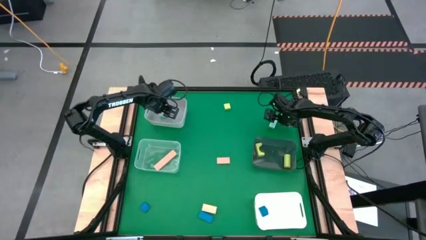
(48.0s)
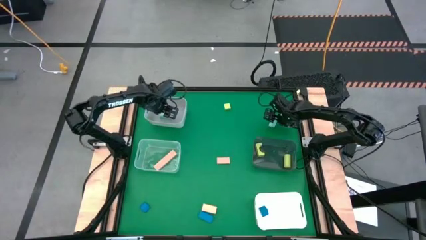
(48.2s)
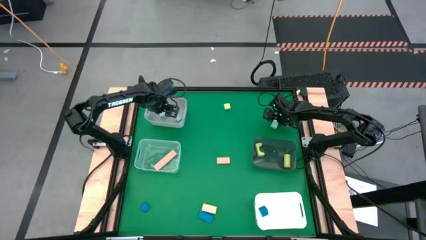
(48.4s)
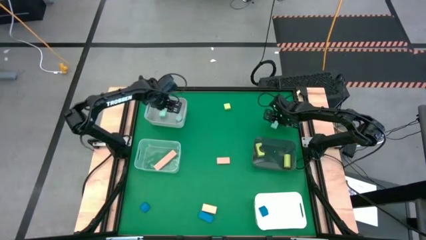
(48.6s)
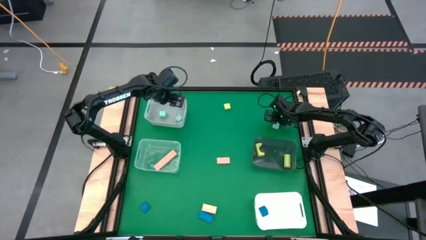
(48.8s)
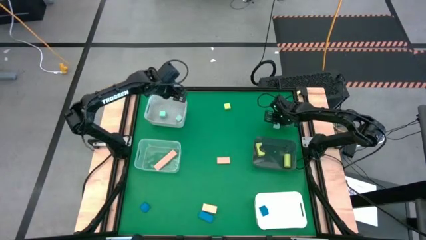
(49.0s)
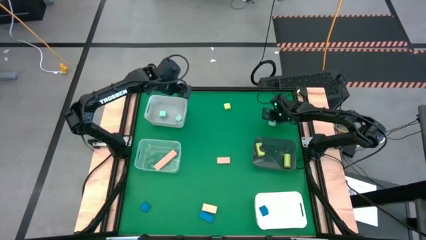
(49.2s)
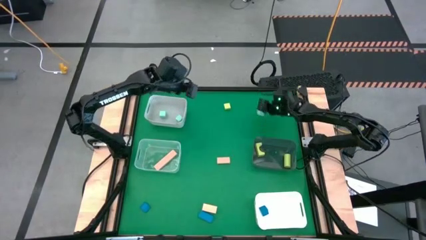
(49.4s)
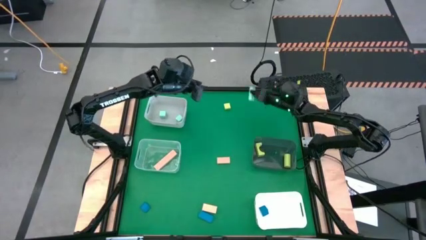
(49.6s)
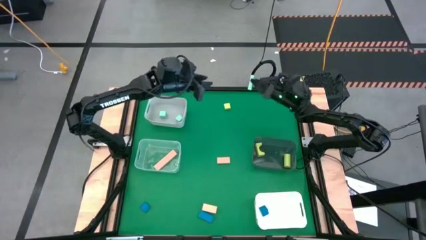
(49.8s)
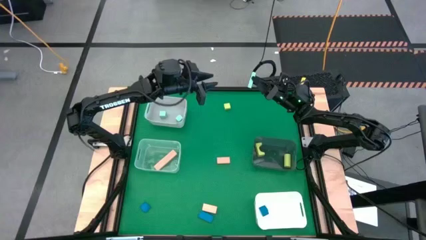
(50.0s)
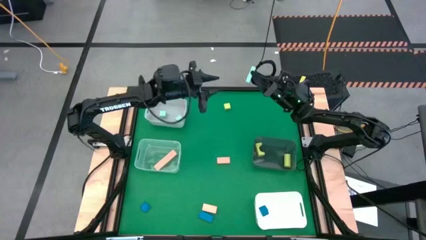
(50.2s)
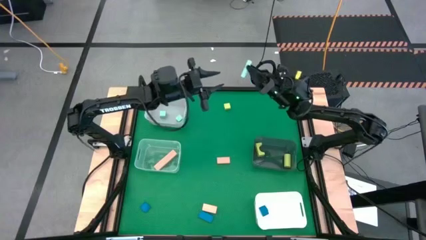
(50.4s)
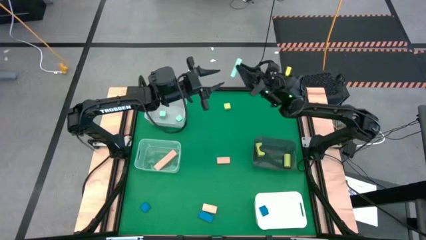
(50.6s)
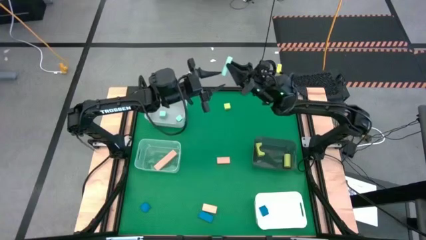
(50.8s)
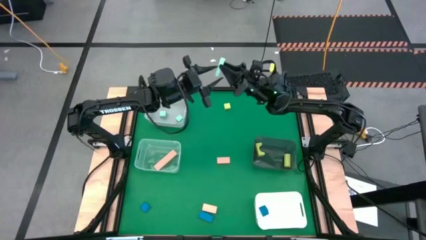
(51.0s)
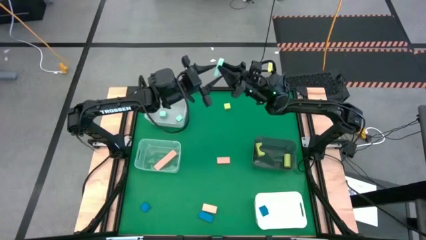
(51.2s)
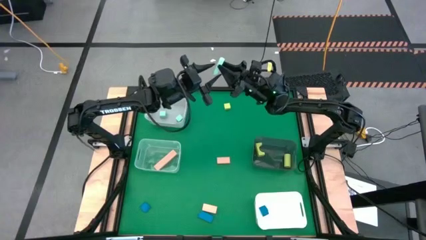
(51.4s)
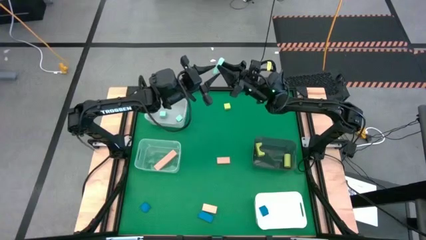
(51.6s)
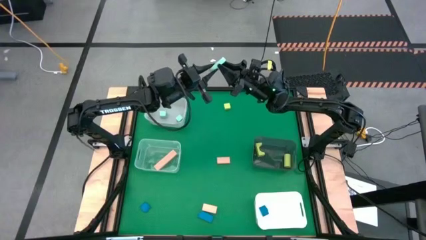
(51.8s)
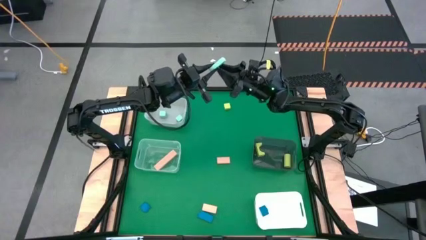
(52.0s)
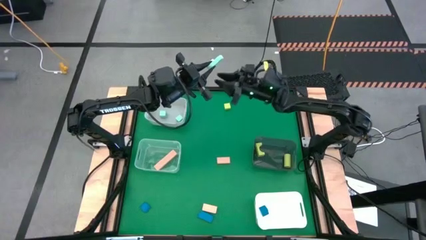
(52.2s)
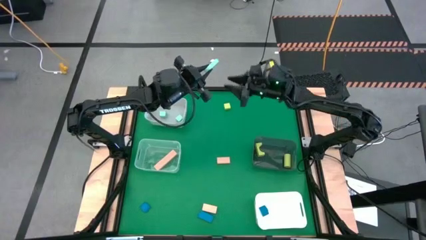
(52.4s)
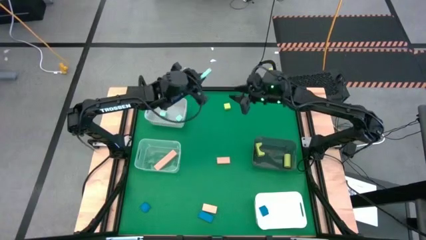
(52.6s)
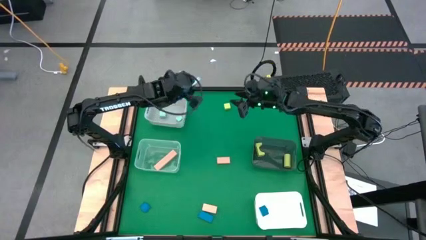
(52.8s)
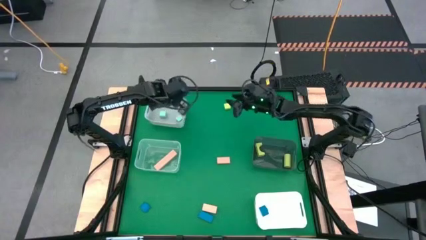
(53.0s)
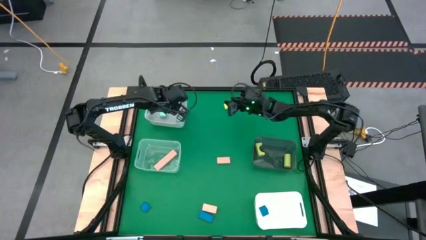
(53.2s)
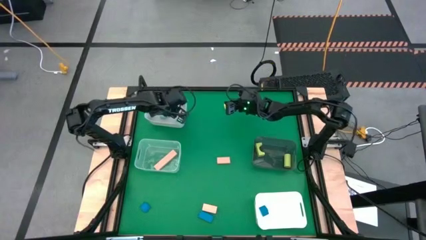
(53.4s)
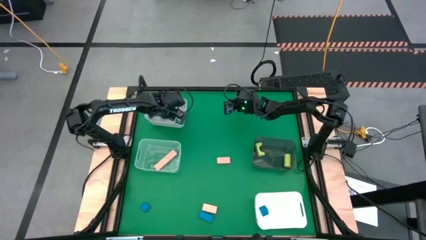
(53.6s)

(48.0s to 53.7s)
Task: Sort & place blocks by color
Put the light blue block into the gray bin

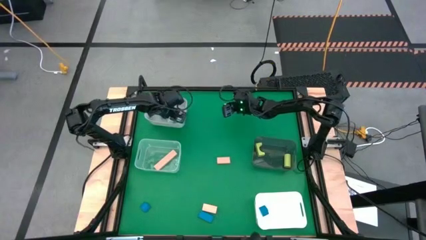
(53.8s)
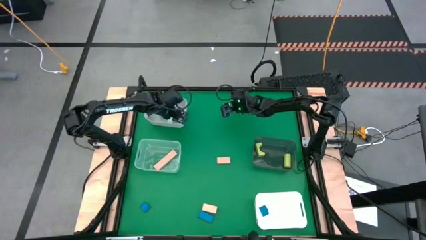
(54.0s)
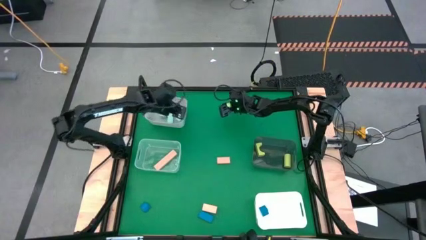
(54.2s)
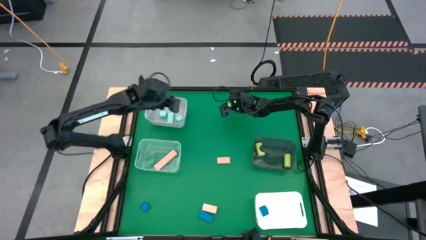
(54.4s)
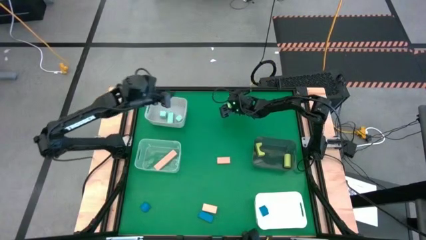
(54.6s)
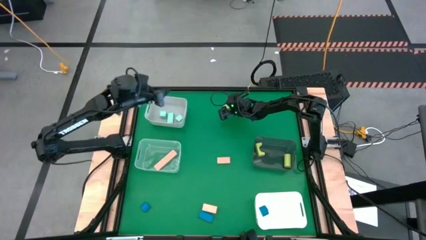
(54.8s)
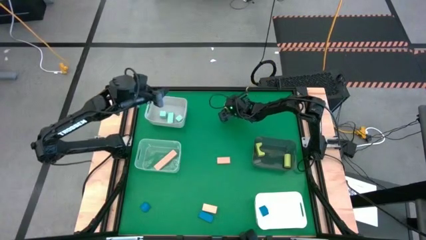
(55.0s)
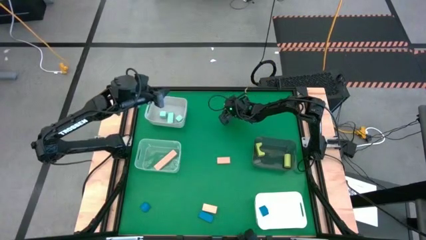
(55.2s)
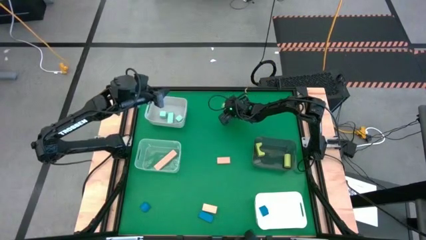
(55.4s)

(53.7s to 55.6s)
Put the green block into the black bin

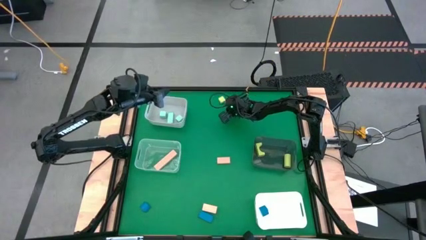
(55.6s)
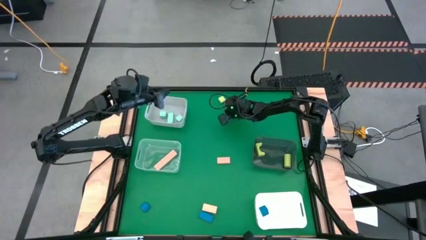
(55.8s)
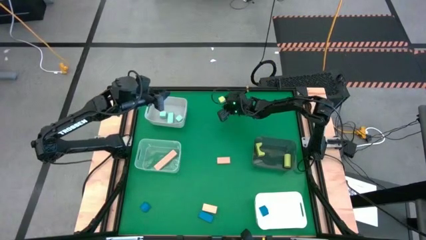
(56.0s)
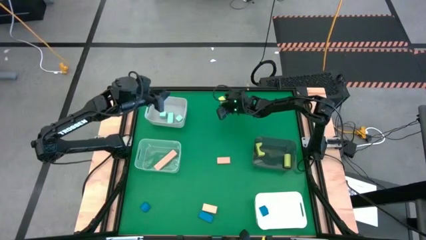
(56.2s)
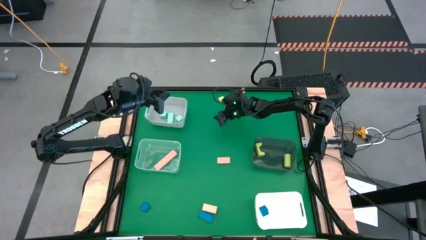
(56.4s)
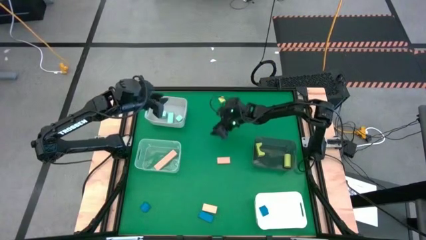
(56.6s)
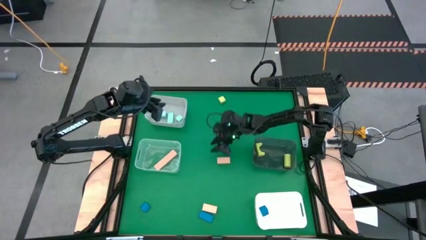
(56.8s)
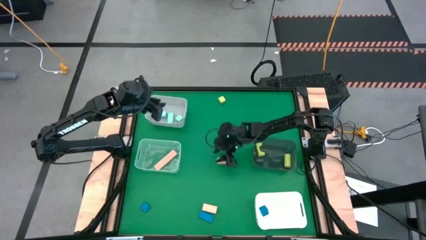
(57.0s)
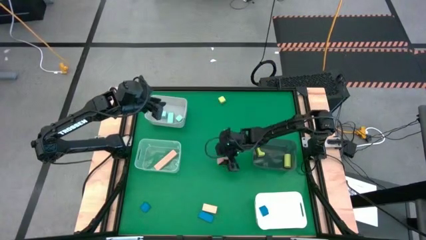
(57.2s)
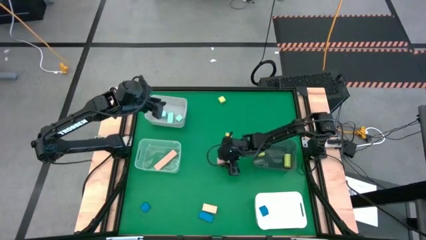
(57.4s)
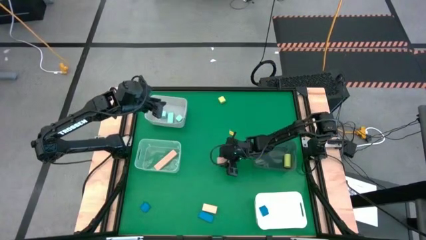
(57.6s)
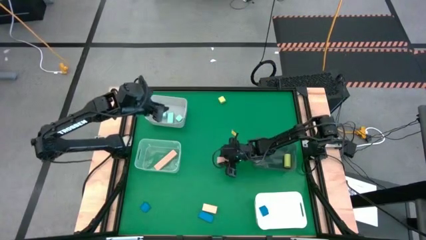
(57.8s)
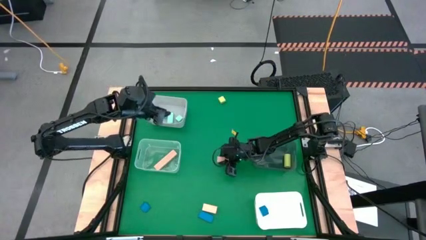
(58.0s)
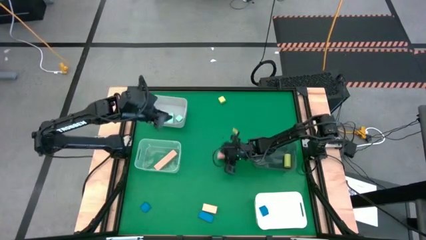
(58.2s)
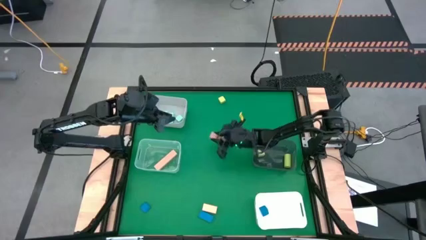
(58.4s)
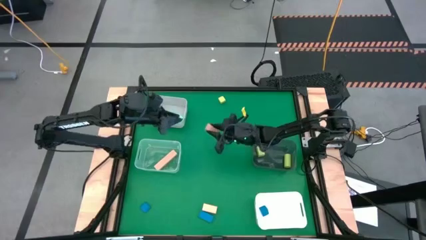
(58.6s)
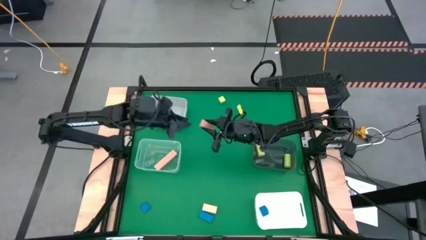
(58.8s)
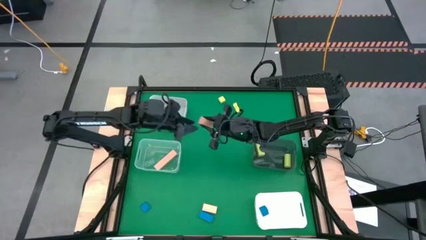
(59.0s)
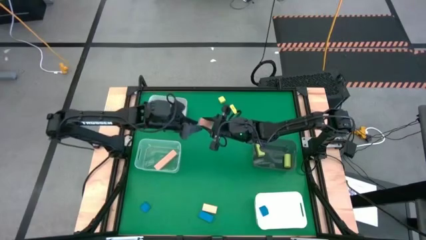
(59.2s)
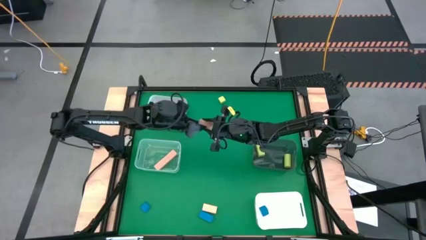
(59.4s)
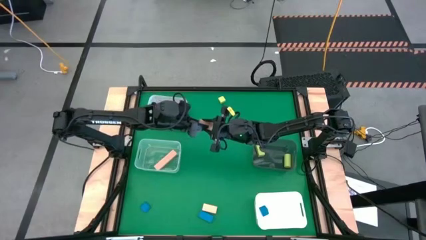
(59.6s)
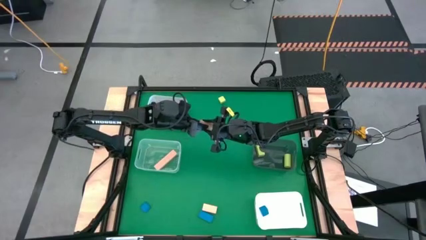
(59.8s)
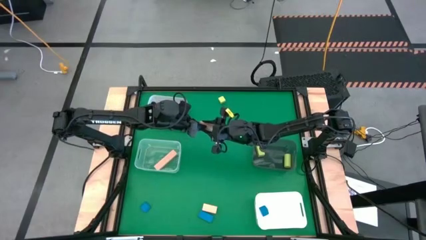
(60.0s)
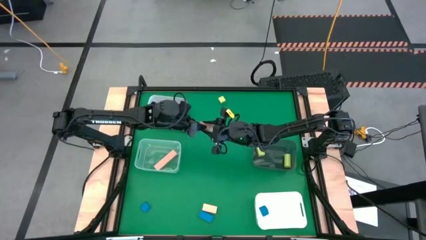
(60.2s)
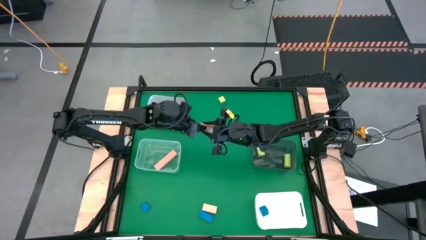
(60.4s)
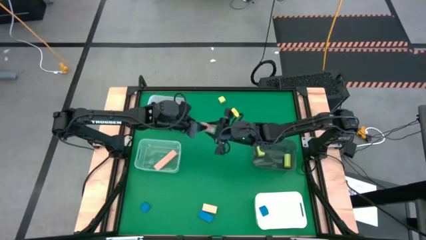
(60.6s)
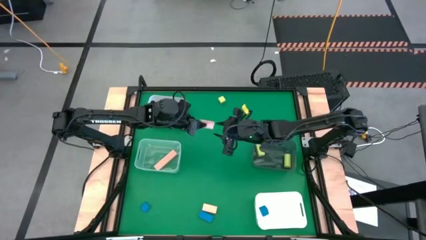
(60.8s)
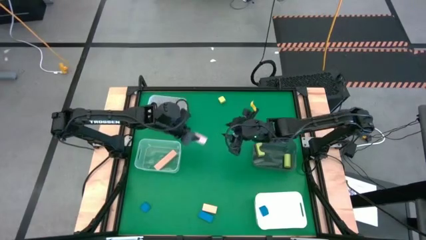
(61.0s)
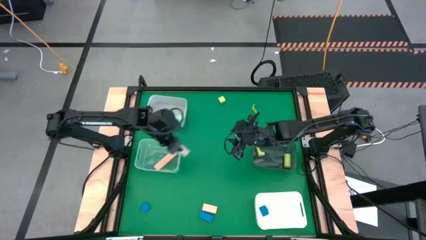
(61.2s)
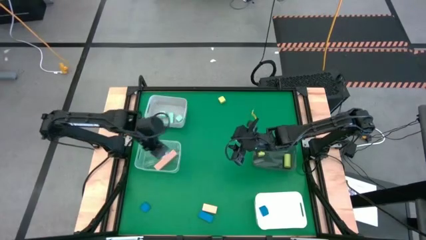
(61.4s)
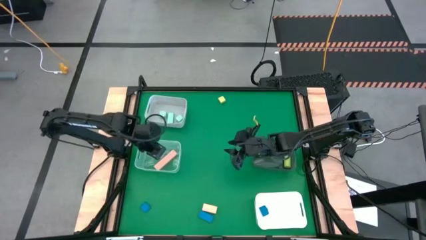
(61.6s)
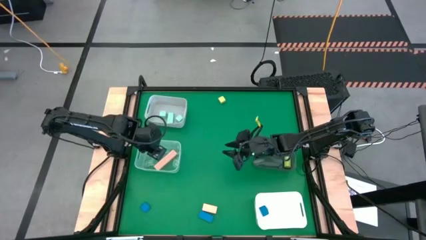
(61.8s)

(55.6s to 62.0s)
Put the top brown block into the transparent bin

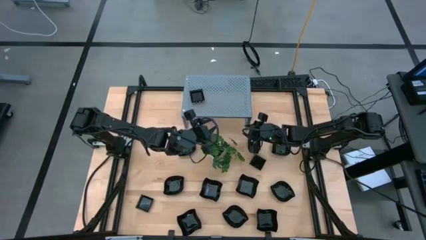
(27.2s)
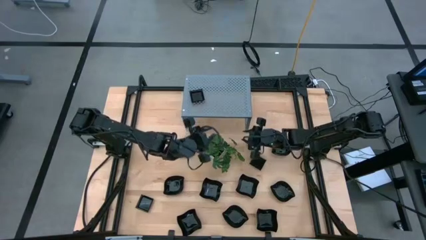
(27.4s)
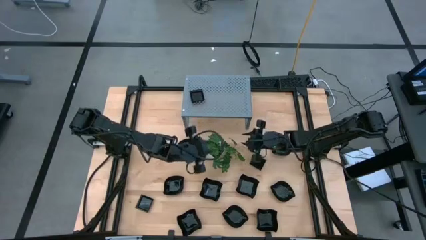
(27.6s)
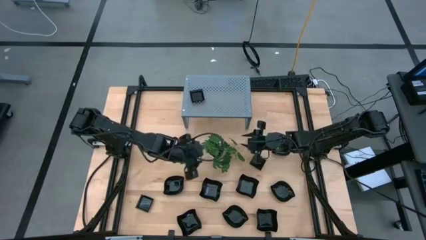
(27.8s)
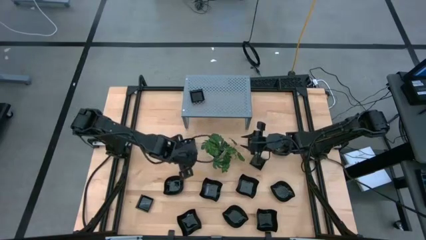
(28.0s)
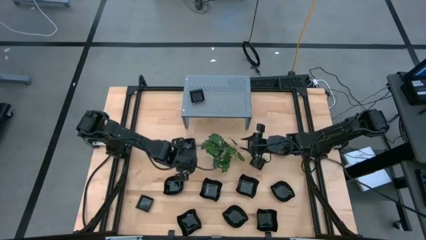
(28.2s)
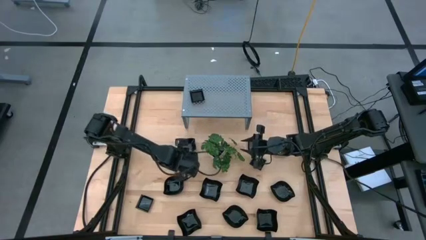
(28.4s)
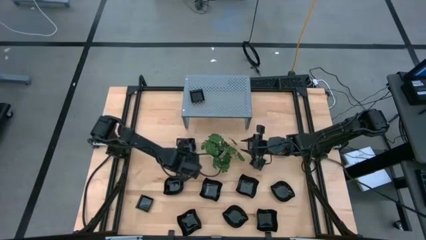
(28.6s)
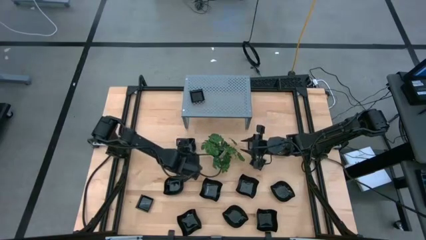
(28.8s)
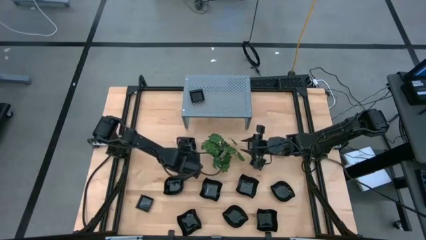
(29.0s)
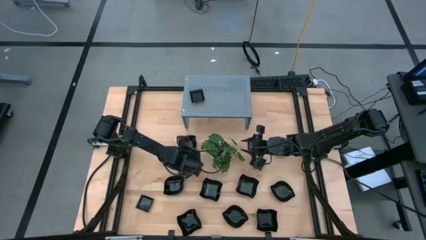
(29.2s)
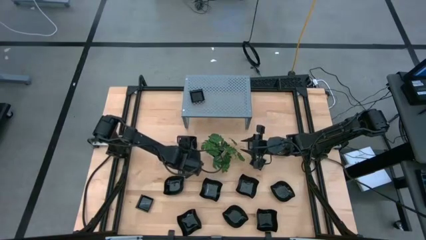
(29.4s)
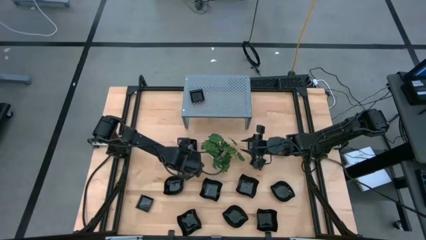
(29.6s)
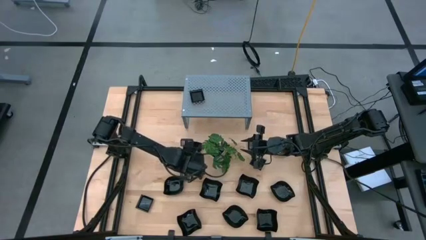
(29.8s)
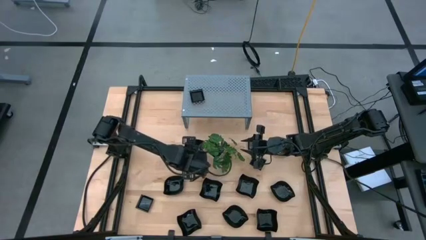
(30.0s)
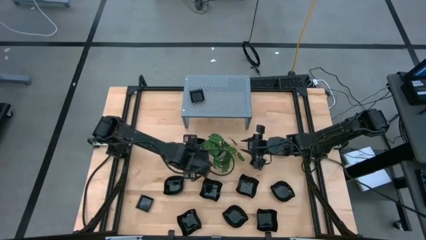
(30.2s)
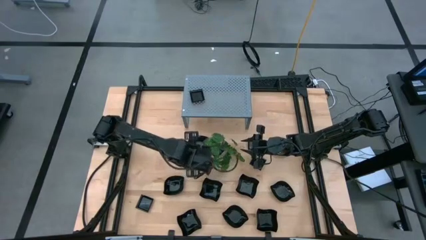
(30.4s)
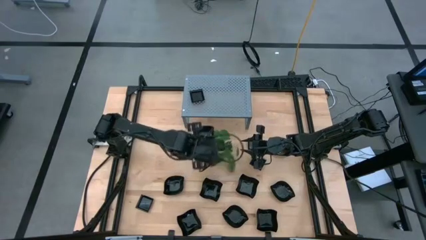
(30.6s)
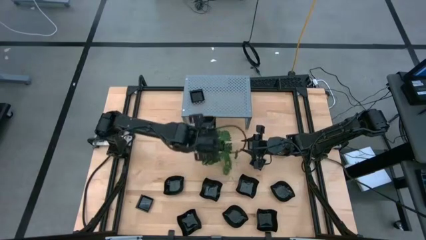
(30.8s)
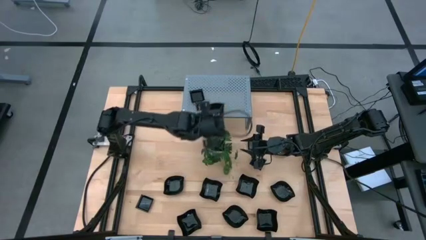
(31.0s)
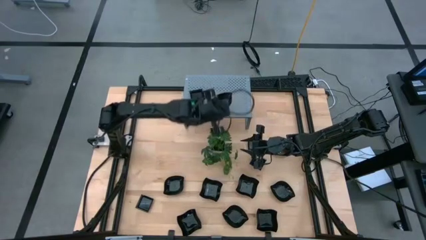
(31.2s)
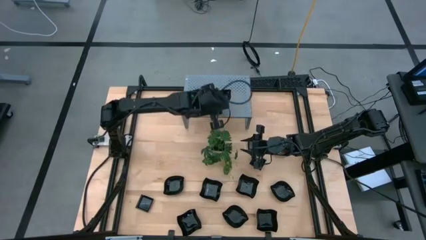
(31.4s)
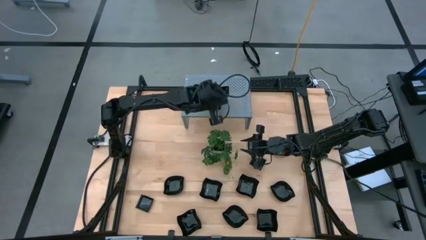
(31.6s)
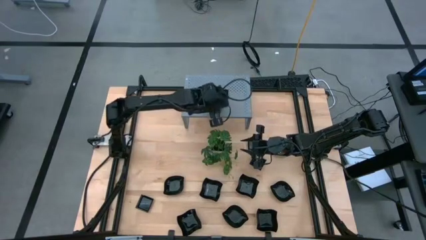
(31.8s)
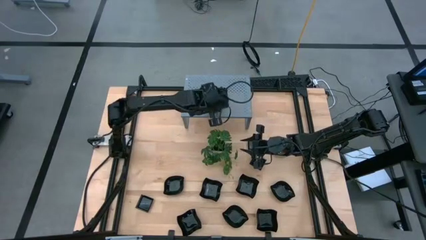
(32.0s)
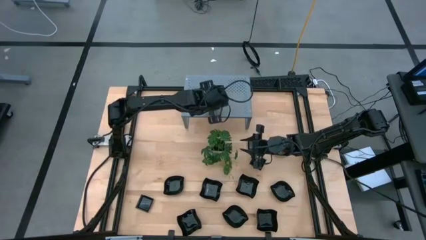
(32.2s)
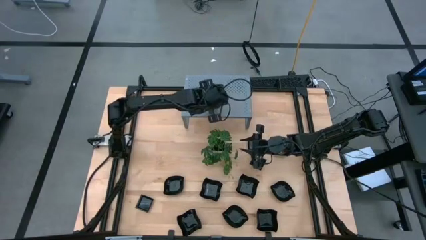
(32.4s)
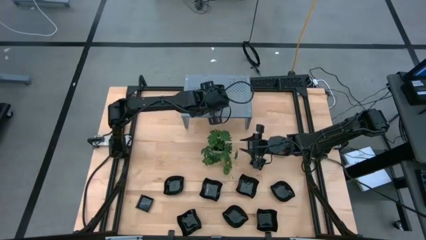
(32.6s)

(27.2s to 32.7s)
Task: Pick & Place Mini shaped plates
Put the black leaf shaped plate on the shelf
